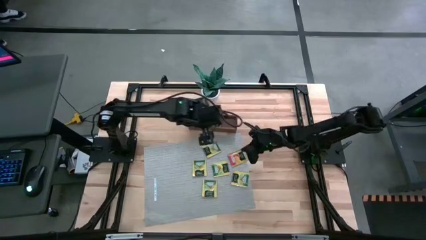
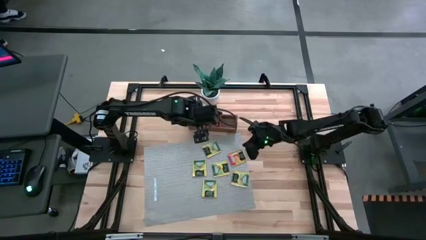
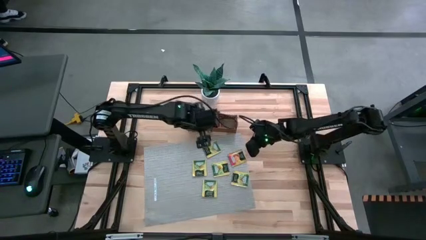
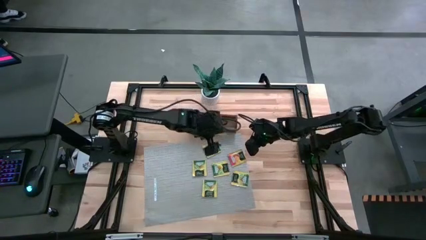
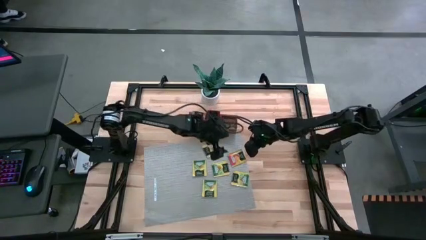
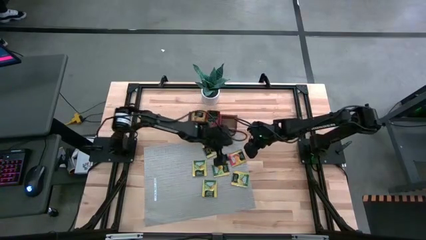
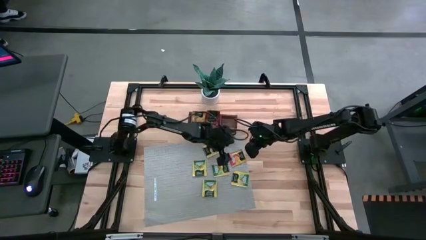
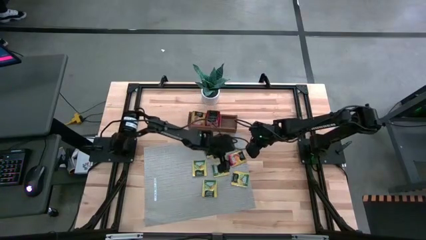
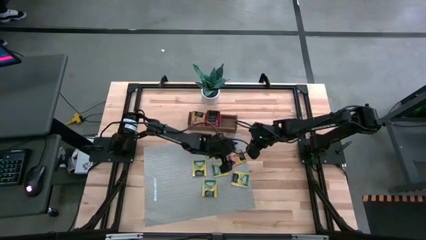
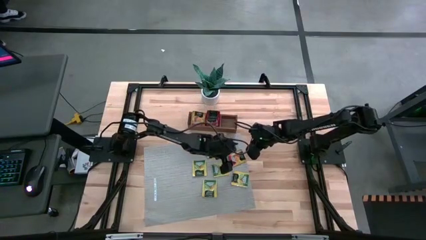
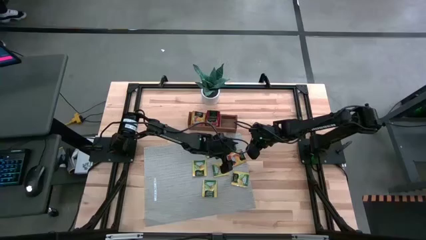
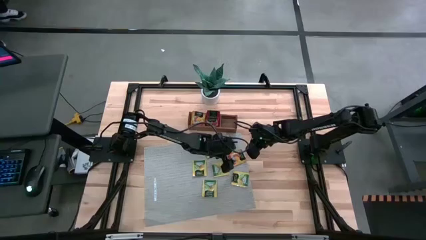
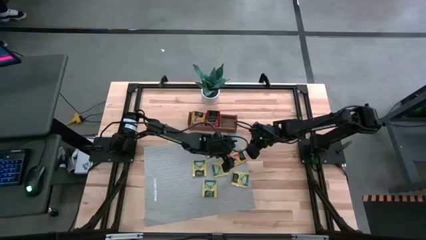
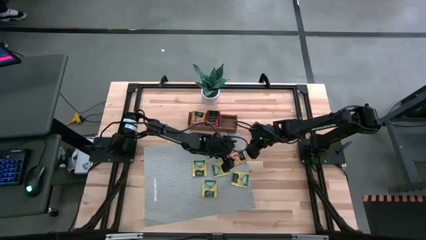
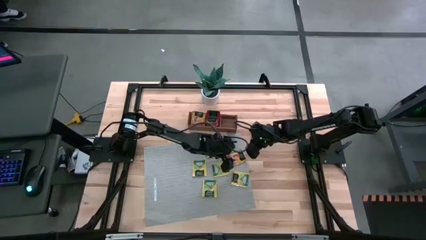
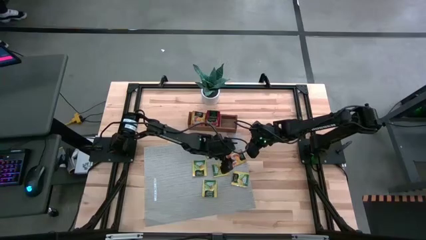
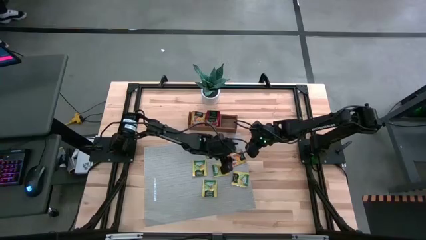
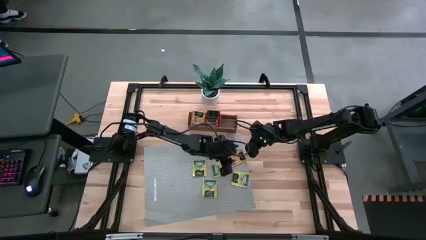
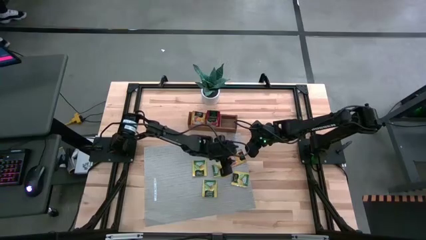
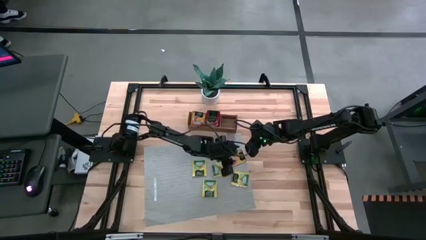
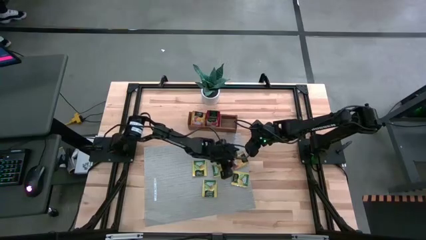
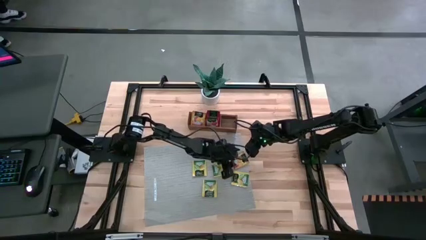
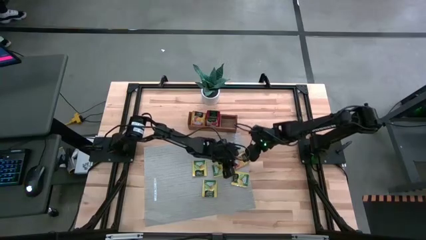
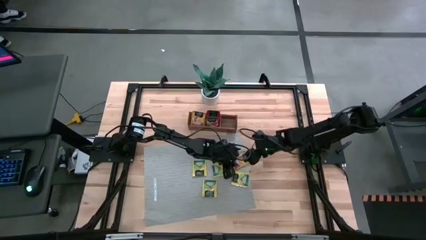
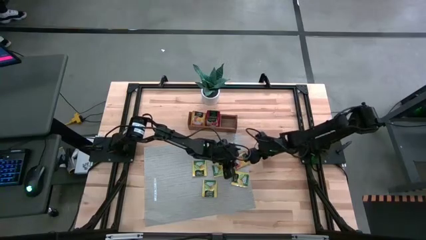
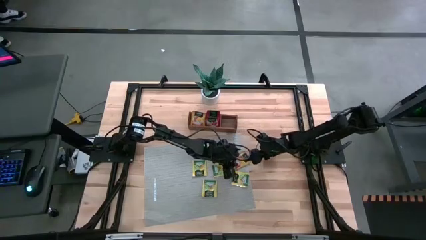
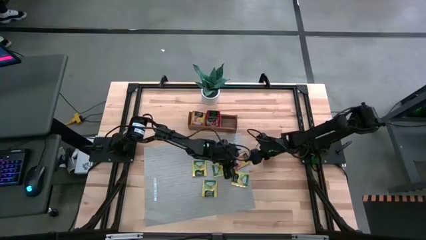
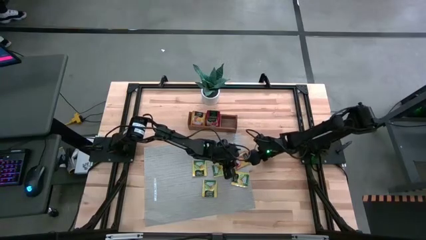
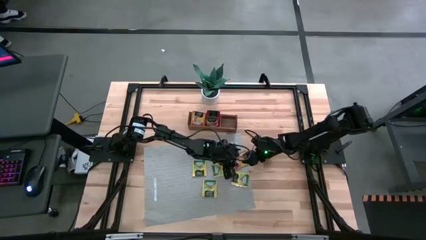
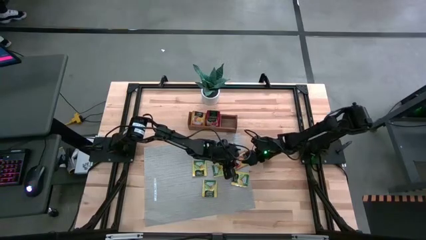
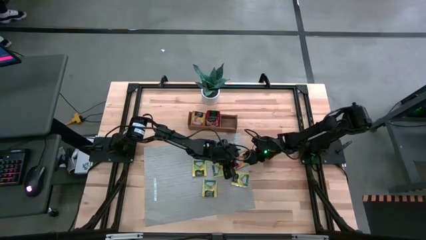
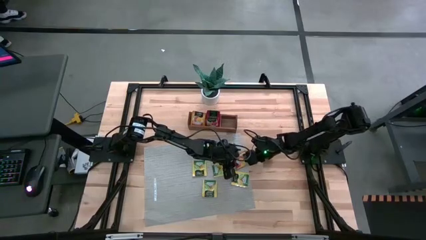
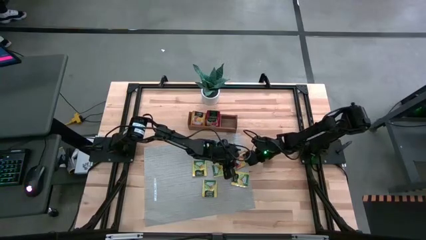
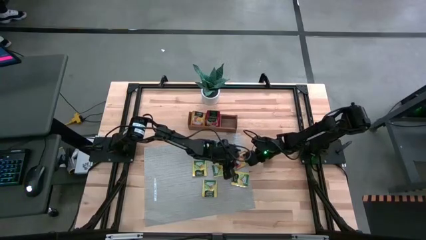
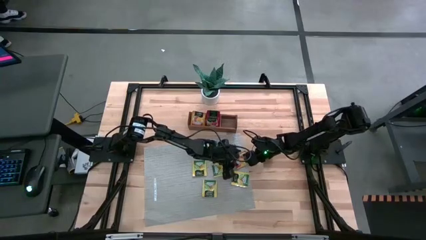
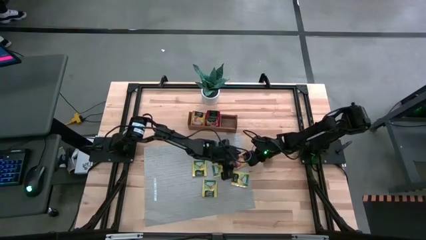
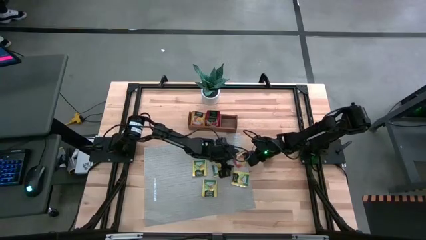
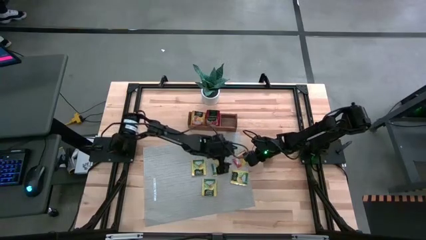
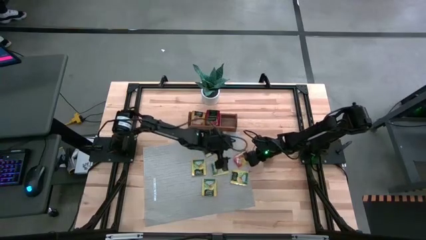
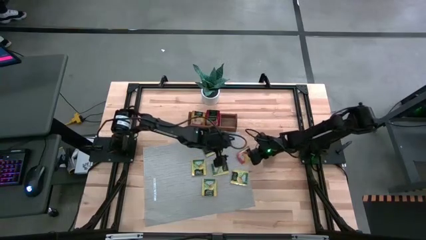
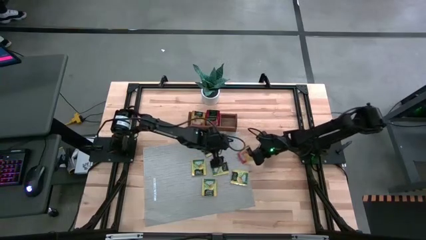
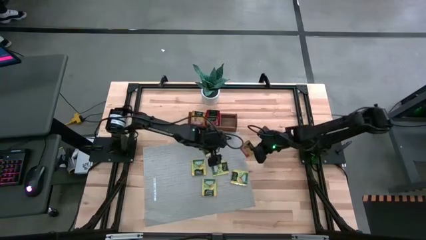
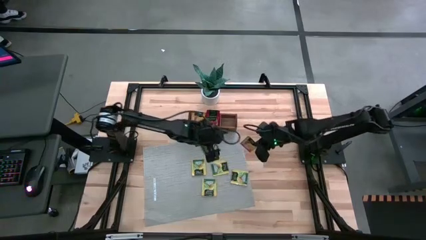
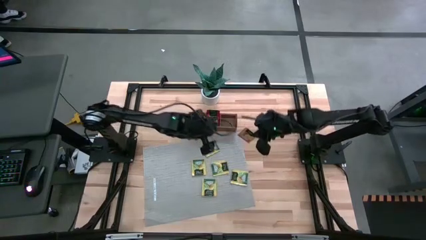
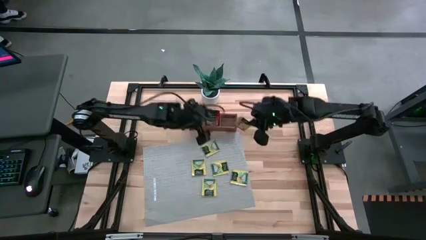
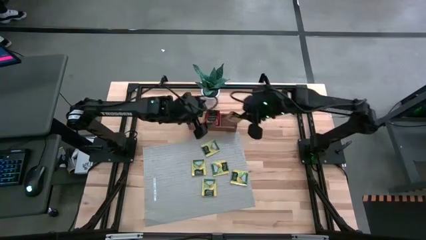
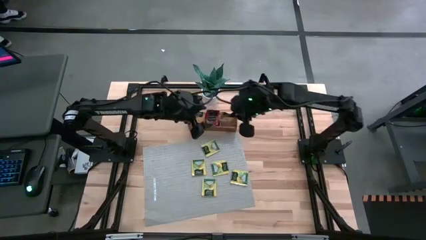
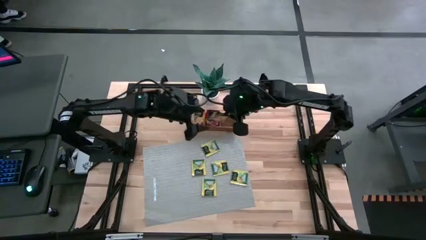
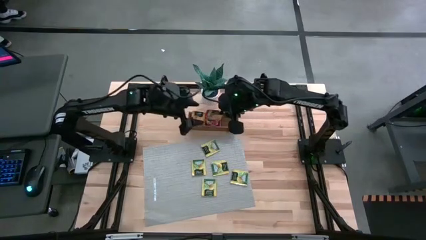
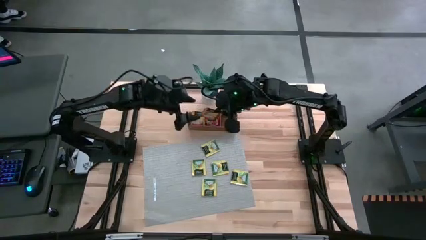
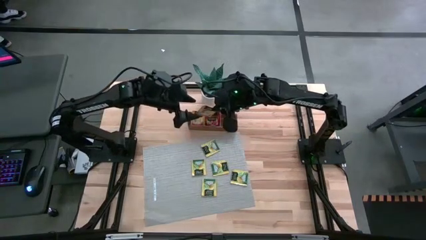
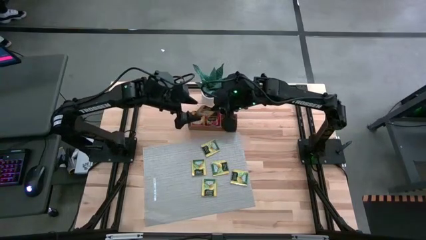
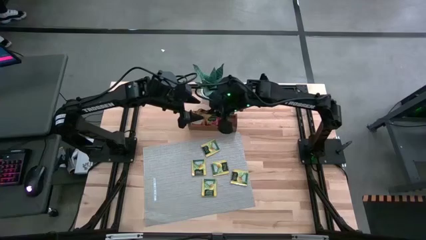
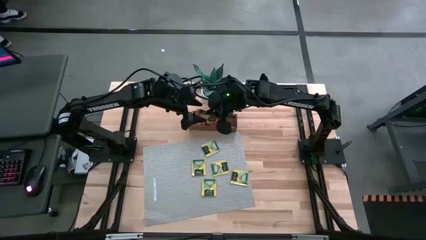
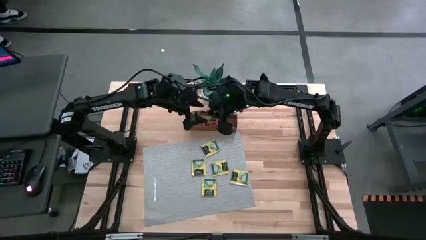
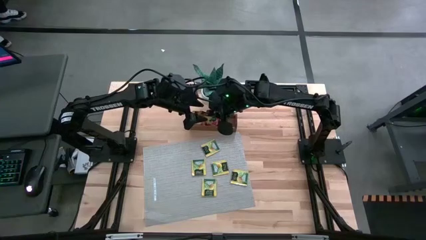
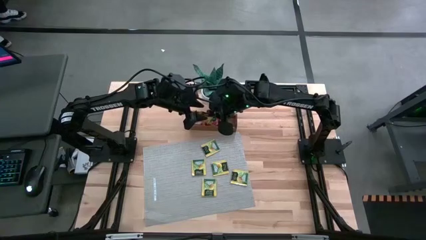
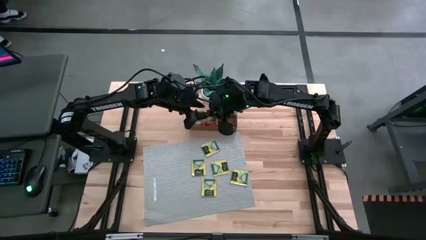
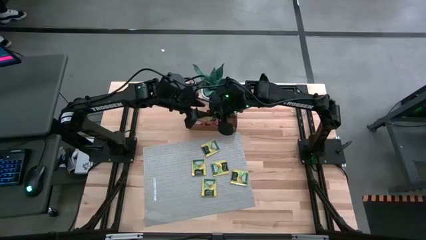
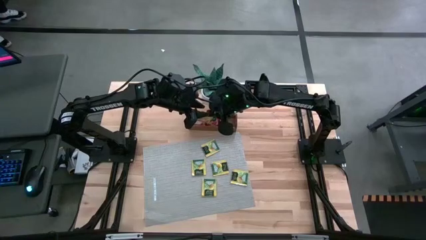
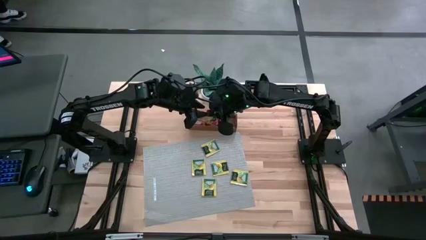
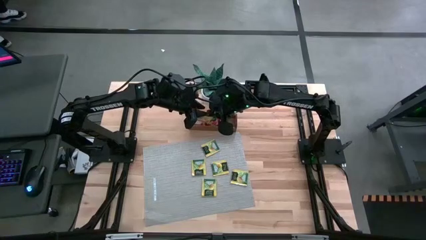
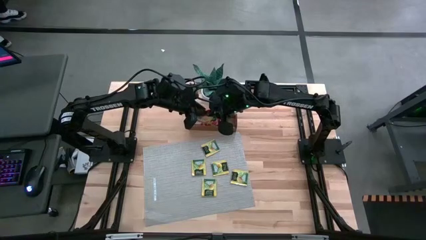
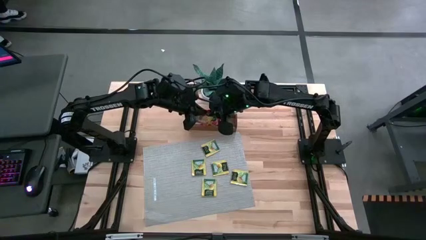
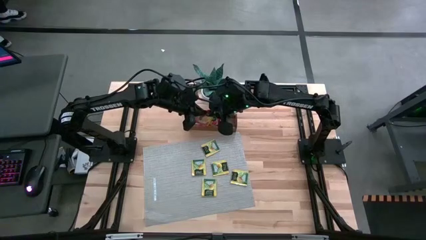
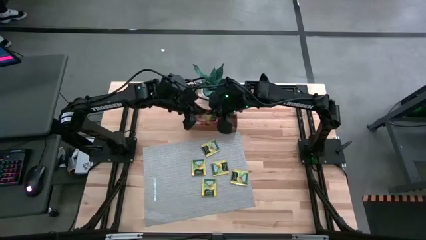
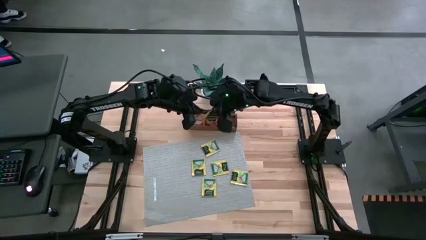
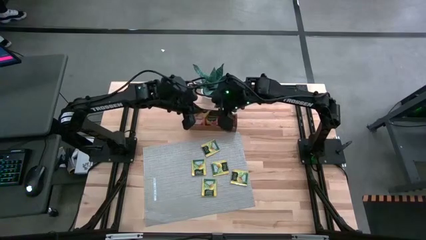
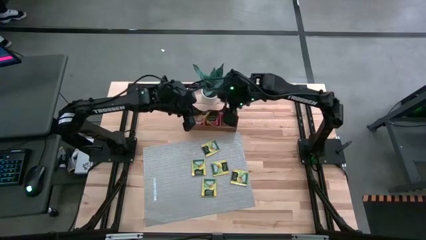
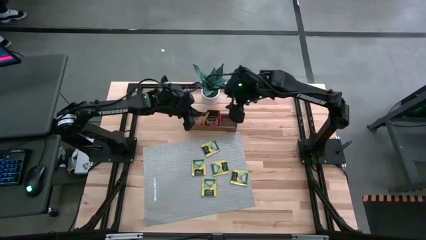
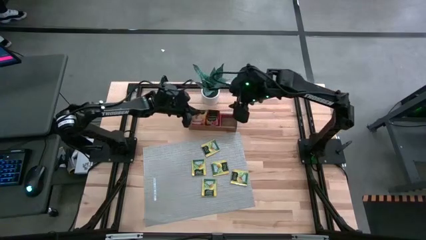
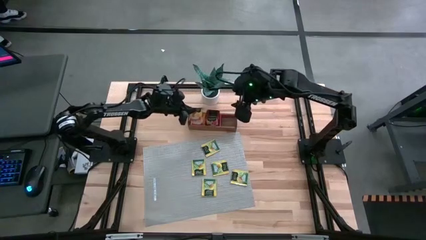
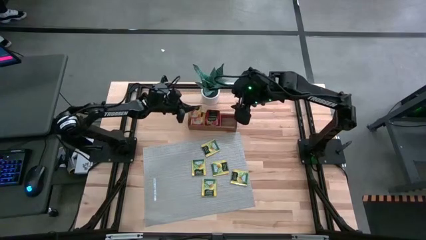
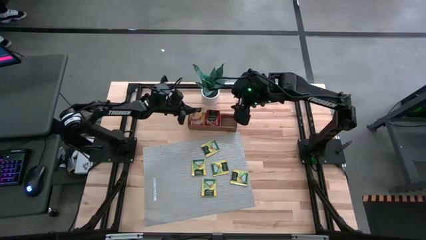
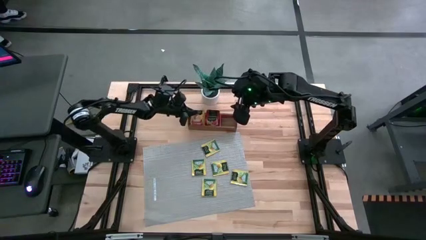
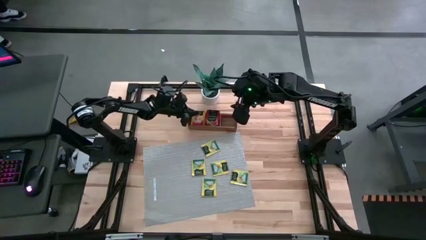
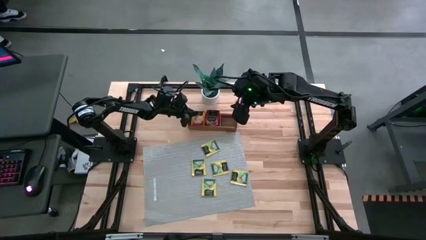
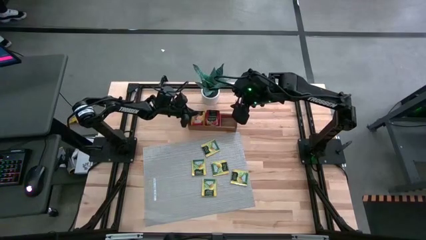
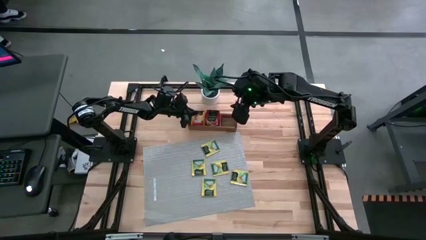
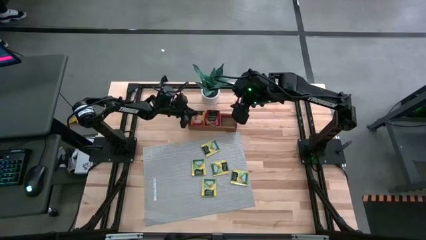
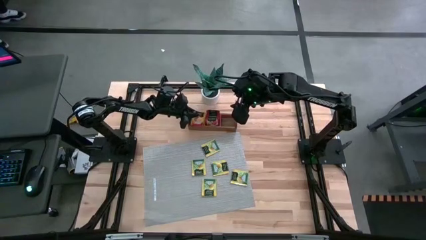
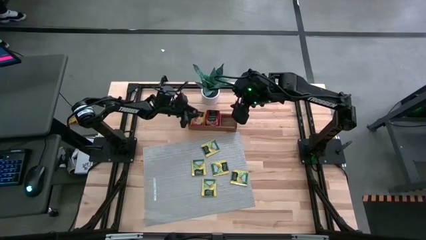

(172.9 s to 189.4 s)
Task: Pick & Place Tea
Put the orange tea bag into the left section of the wooden organizer
